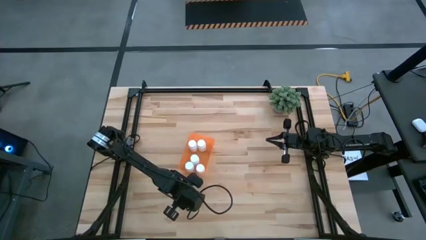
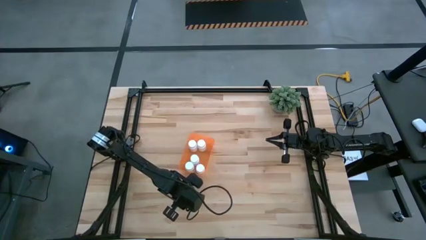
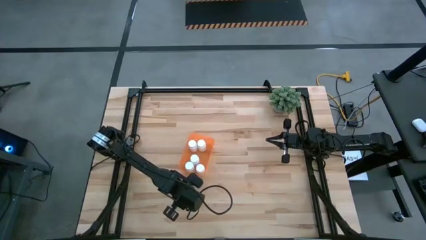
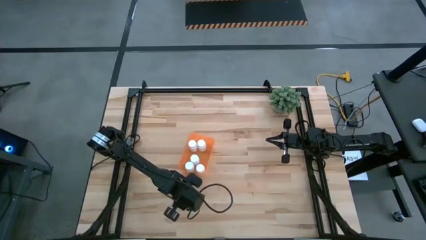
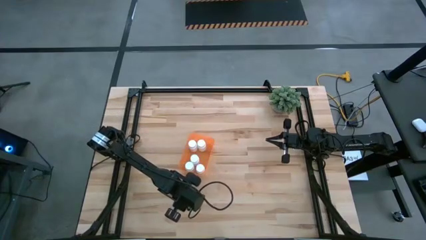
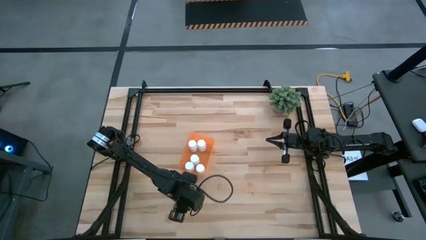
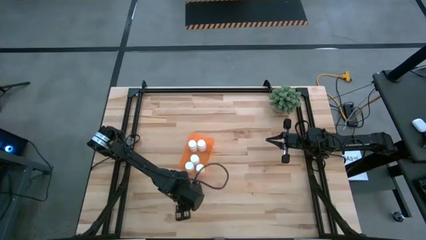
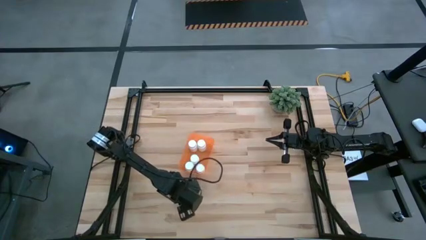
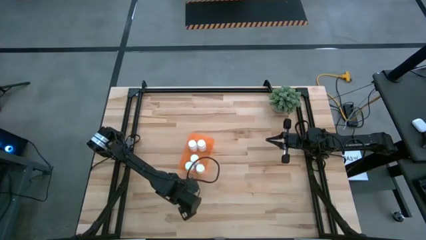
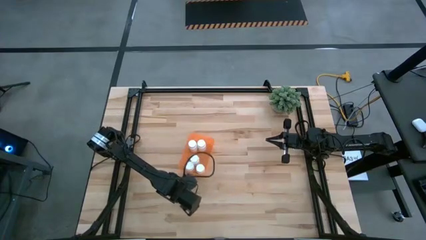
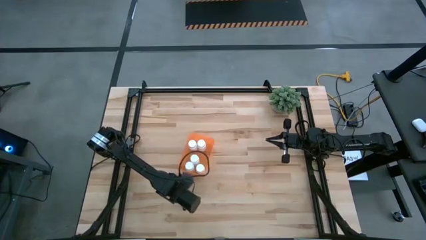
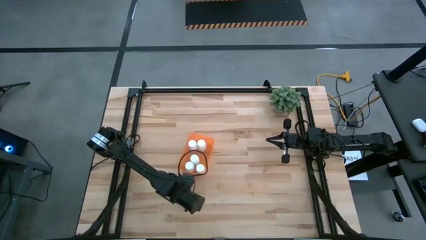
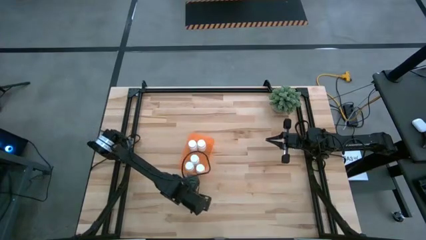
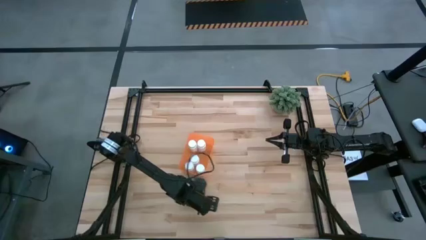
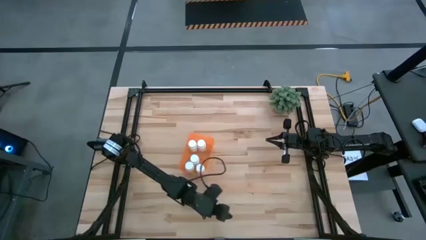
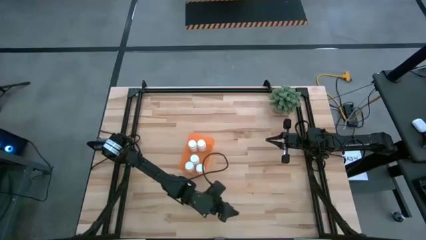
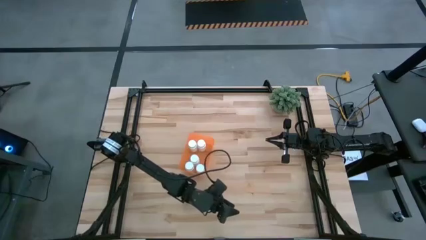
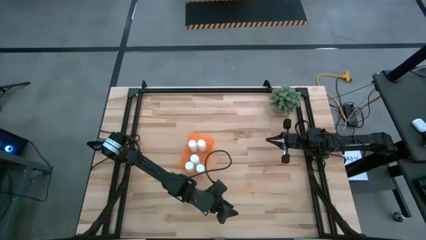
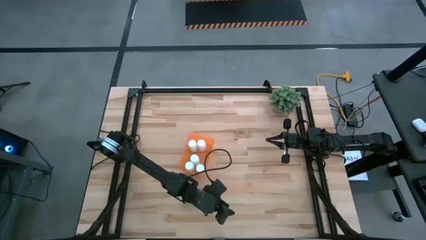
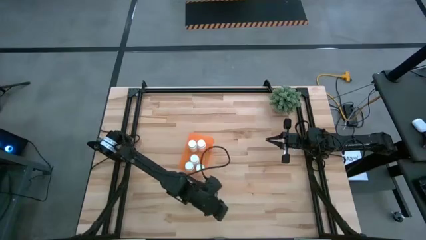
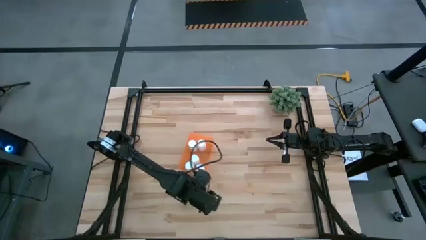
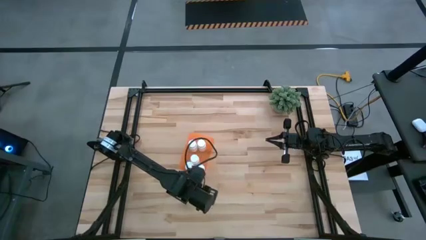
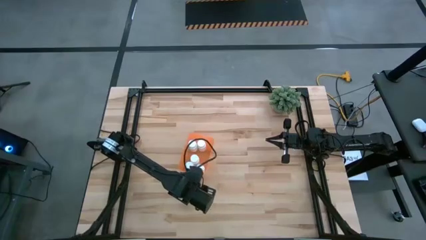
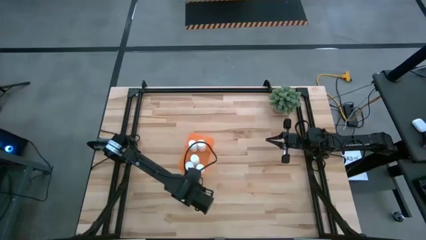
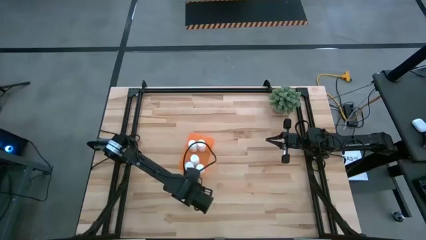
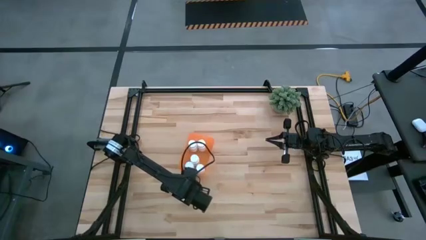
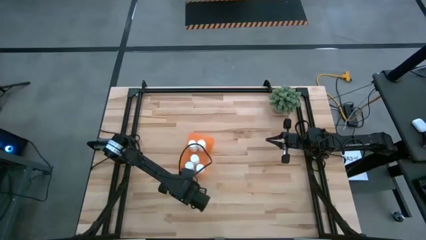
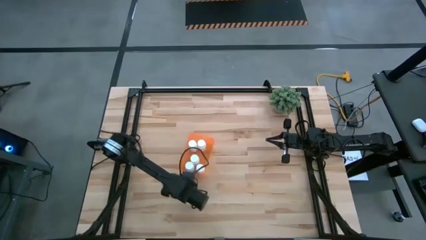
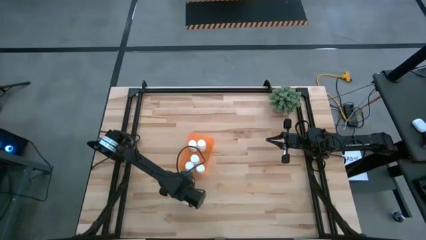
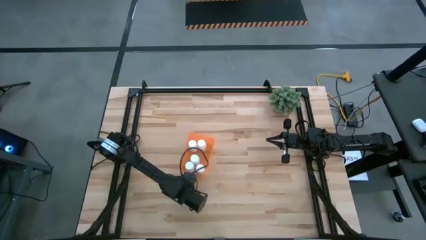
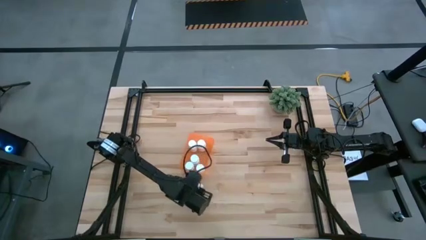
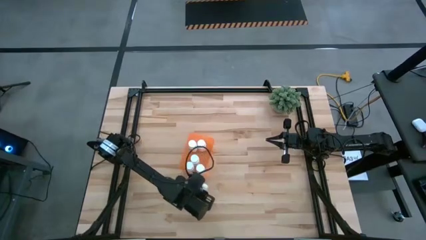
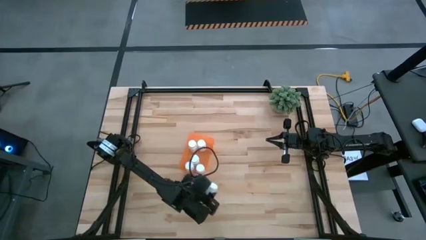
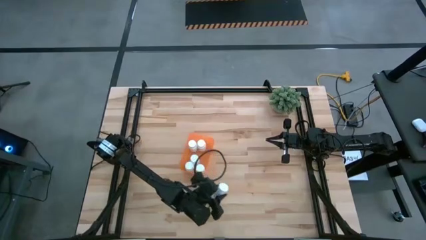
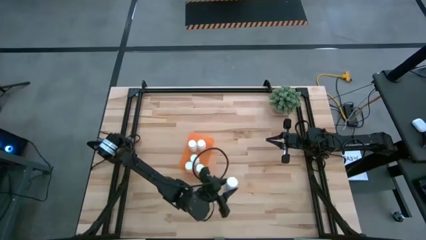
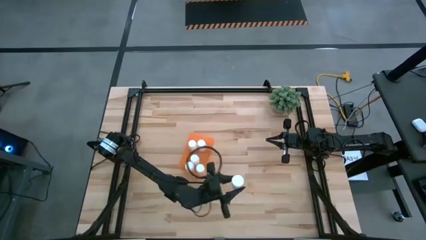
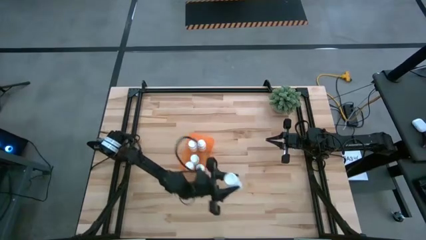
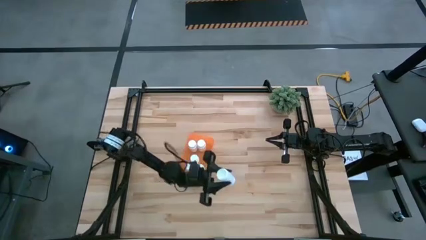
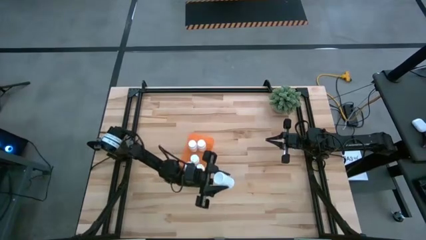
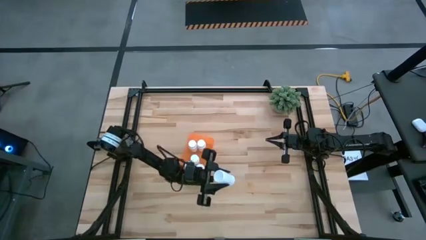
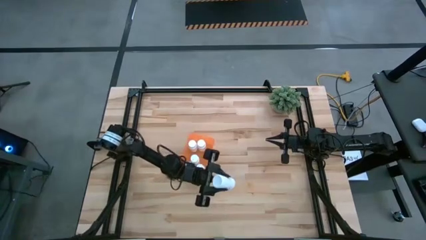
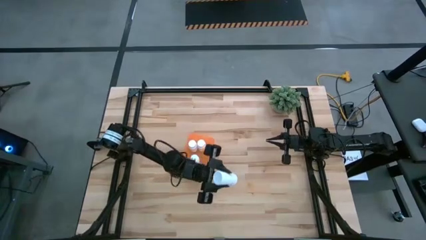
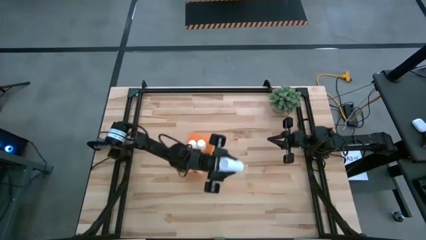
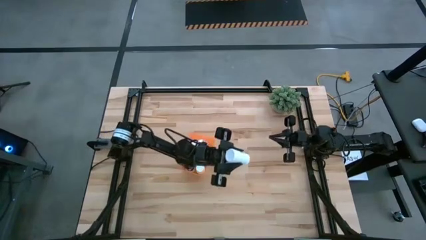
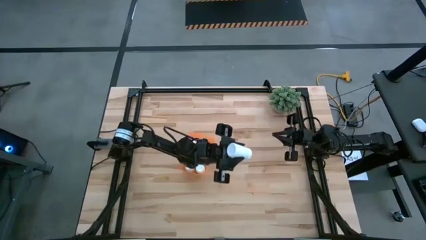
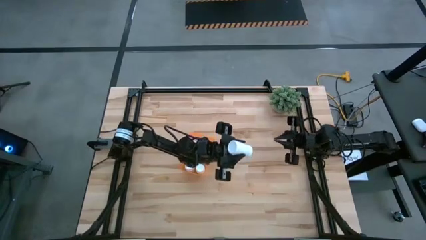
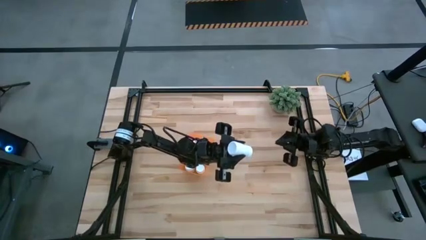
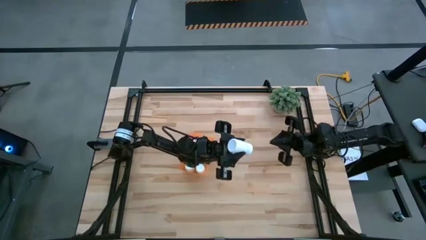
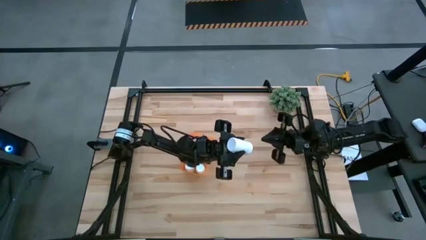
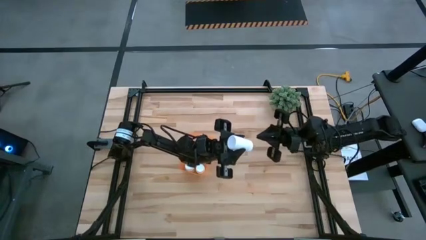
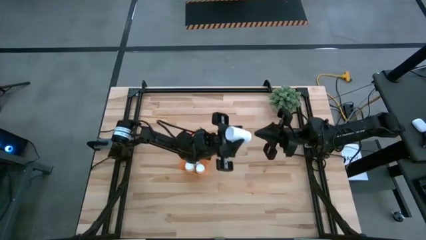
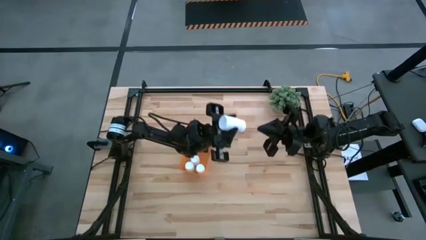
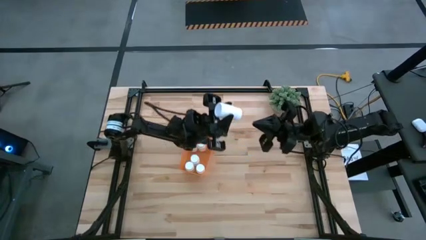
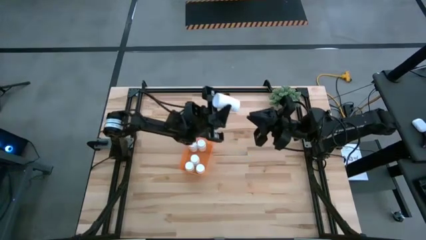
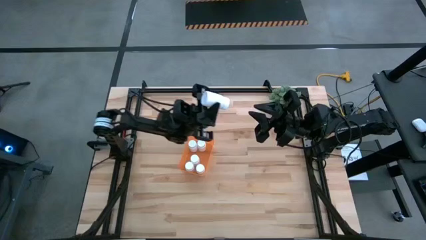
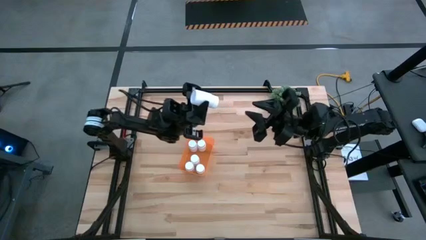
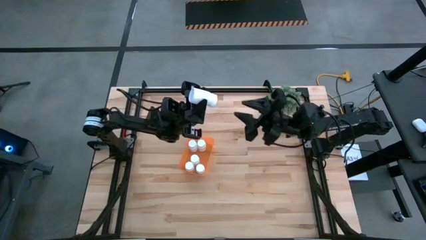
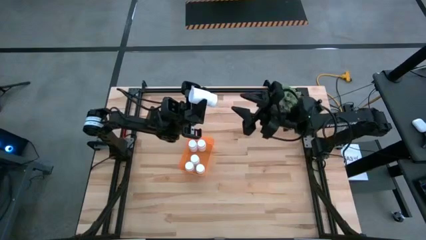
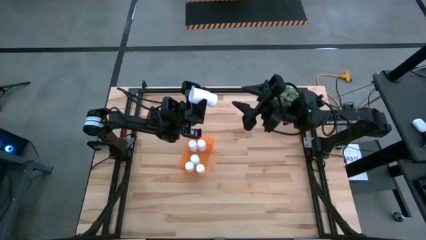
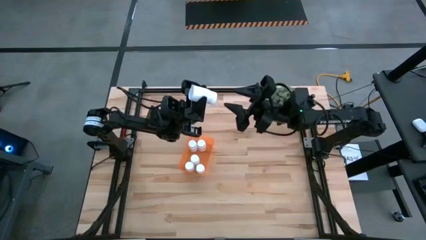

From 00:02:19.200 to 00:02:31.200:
Task: Pick and place pill bottles into a basket
Put the white medicine bottle into the orange bin
